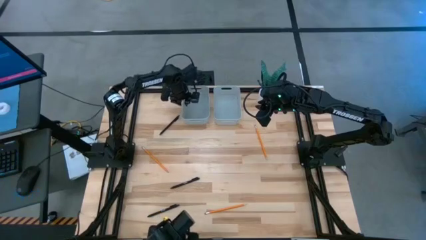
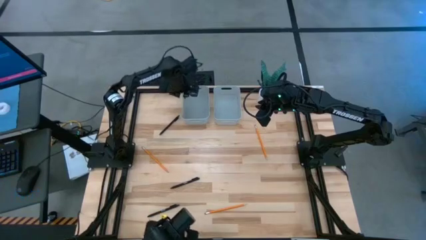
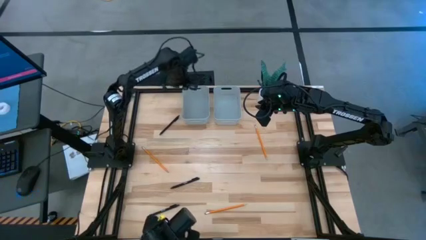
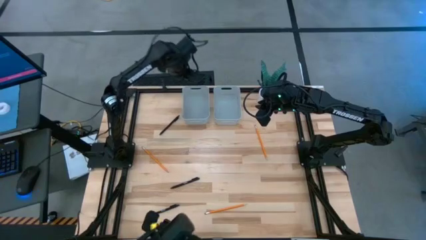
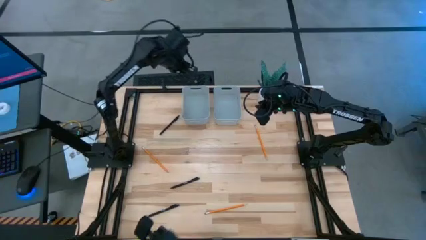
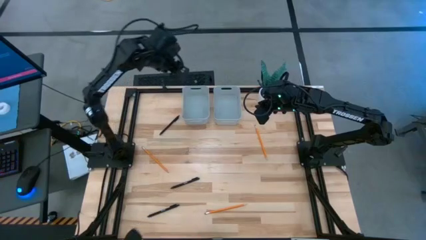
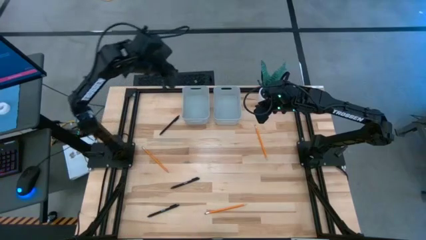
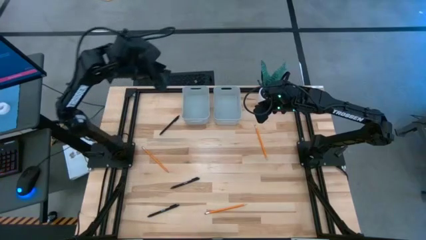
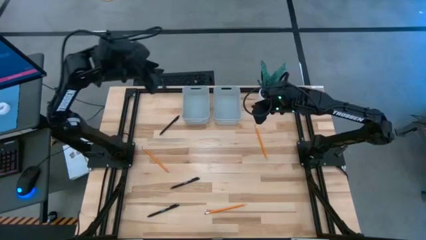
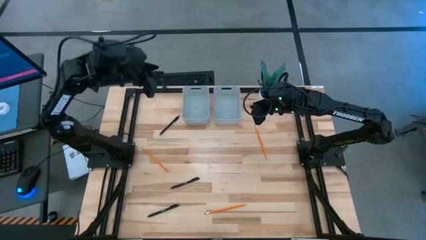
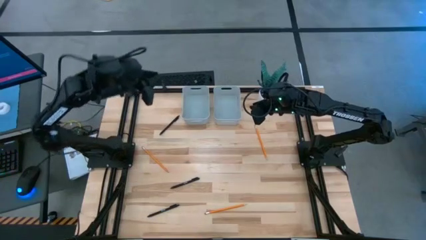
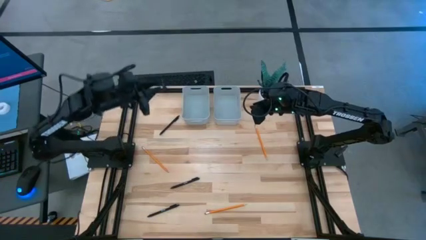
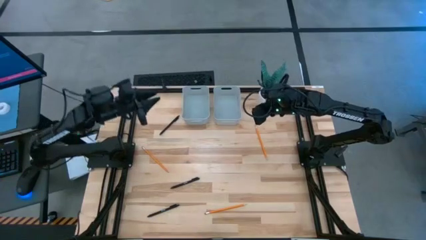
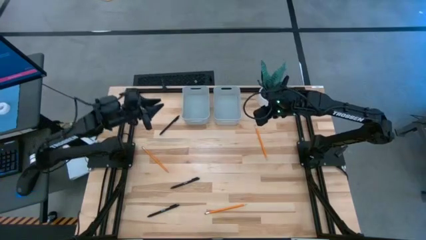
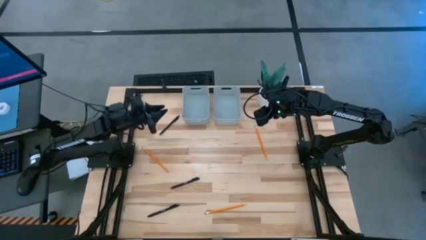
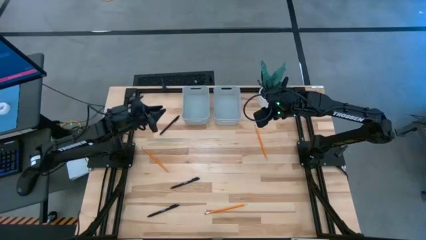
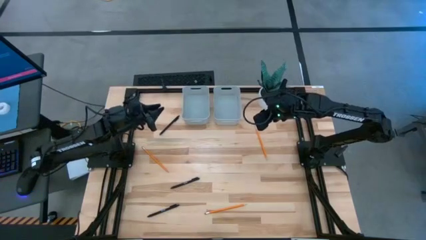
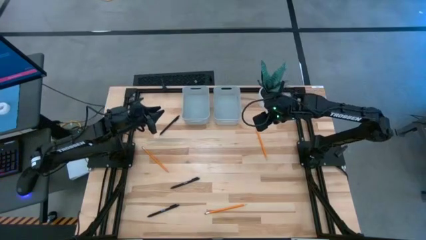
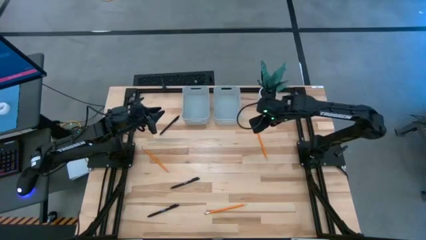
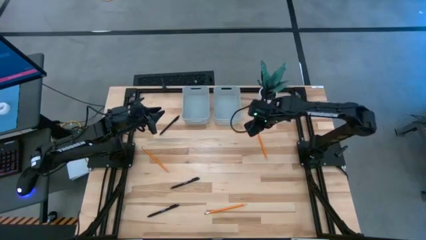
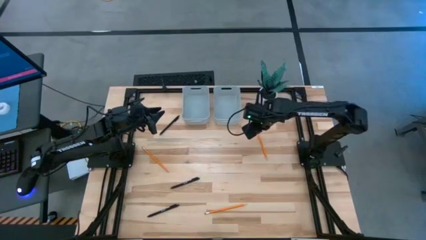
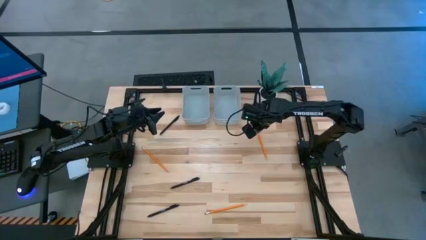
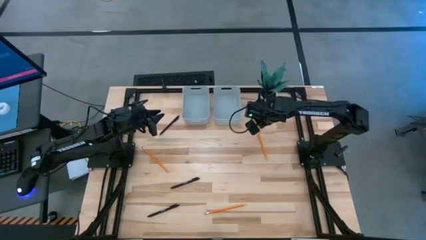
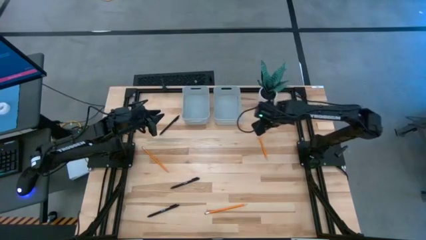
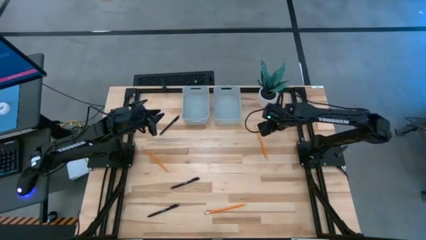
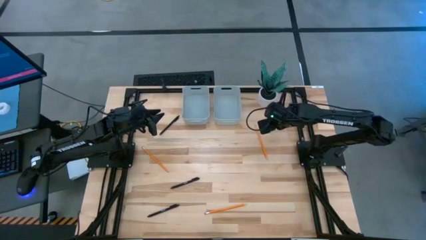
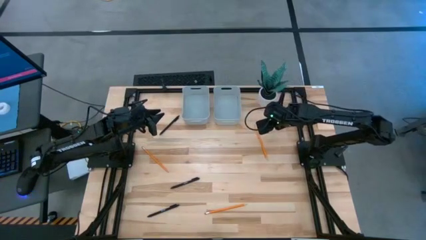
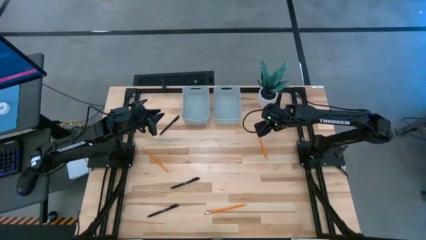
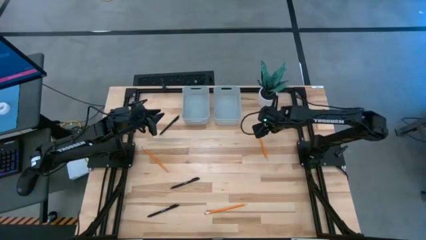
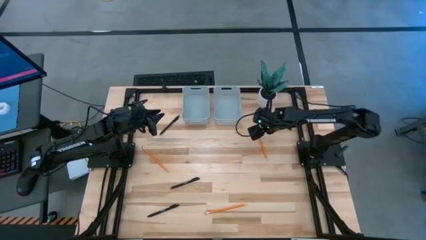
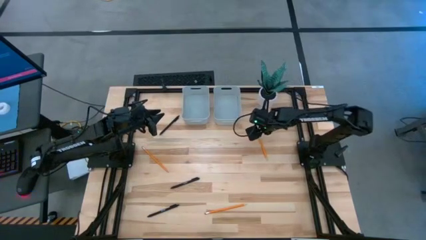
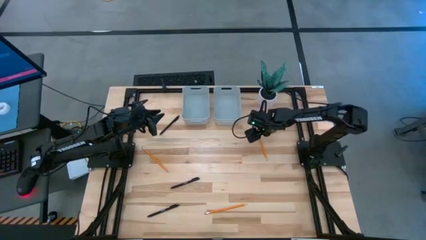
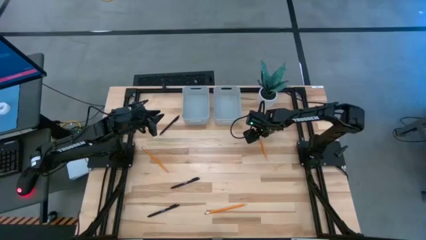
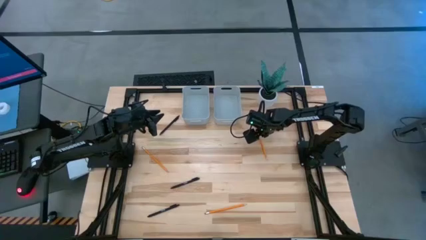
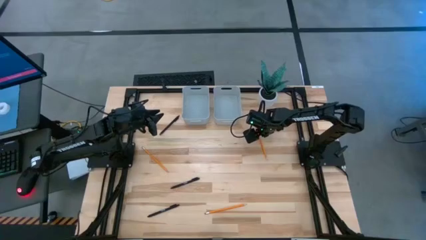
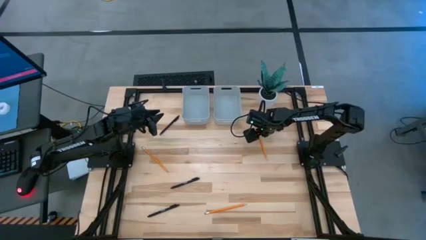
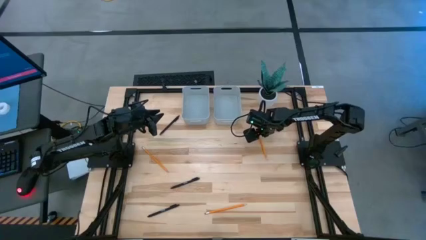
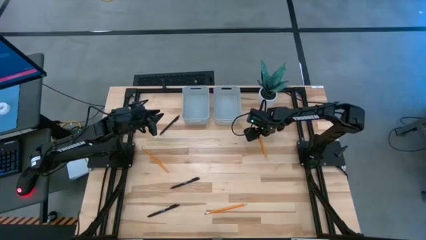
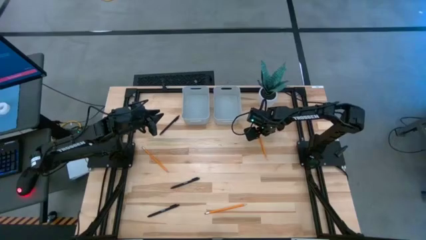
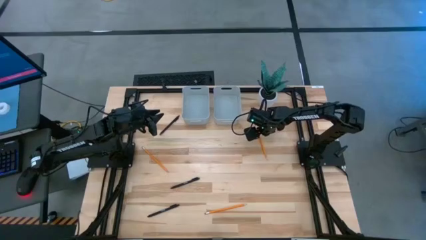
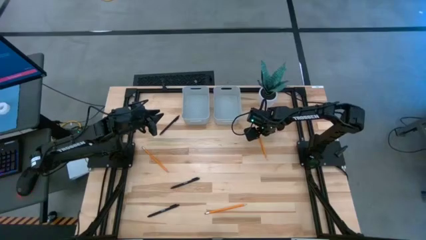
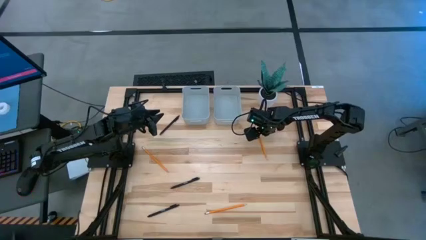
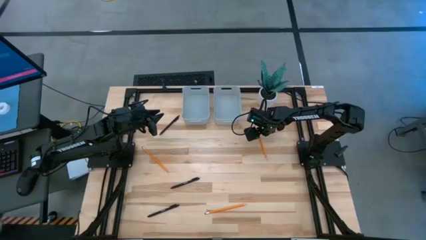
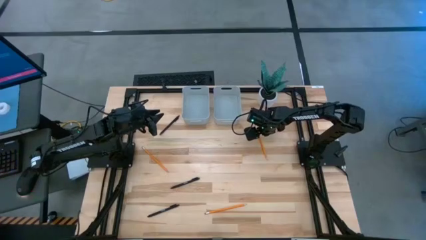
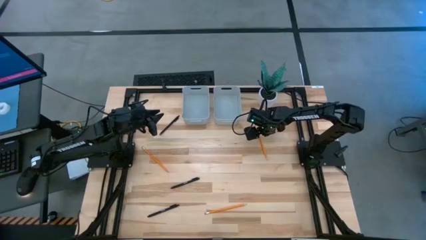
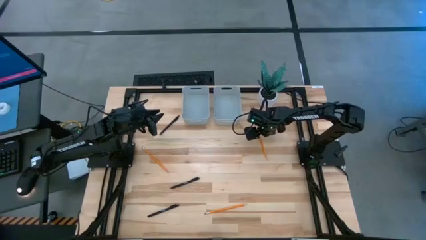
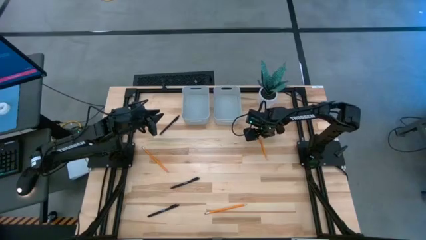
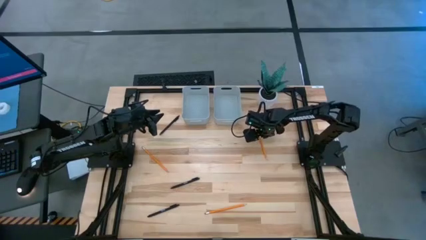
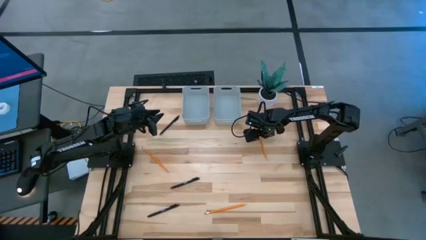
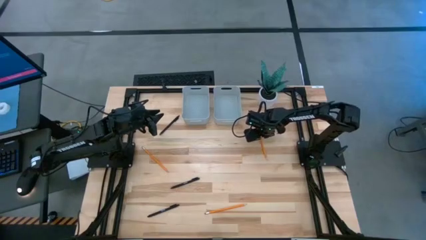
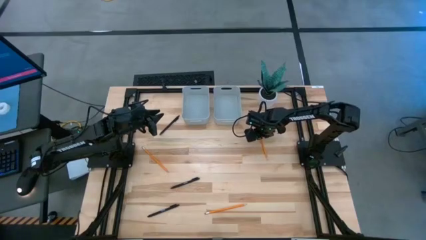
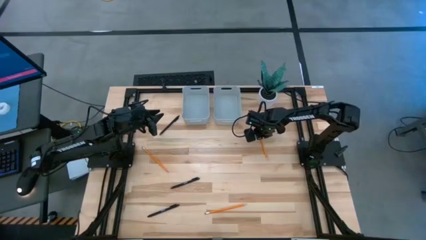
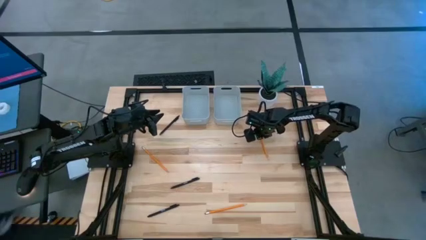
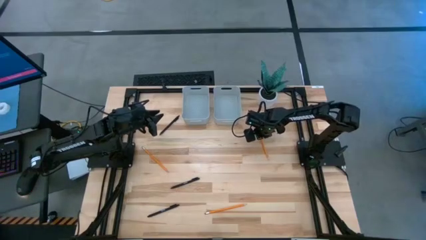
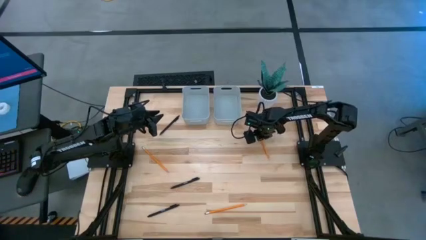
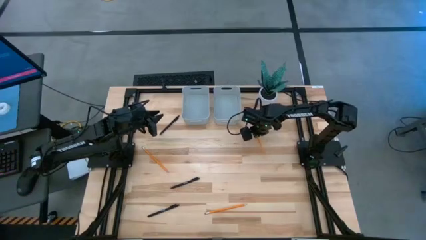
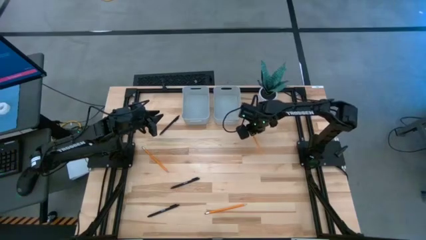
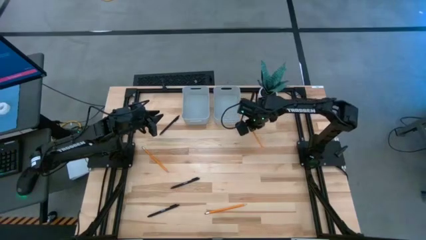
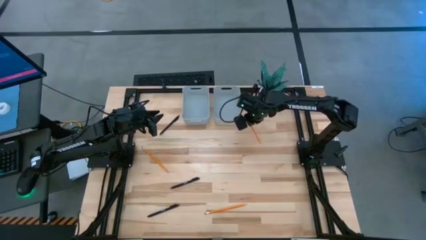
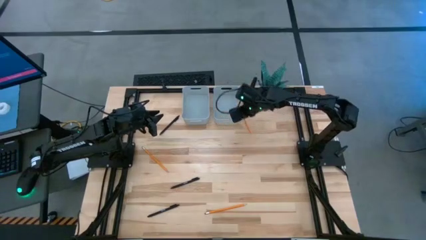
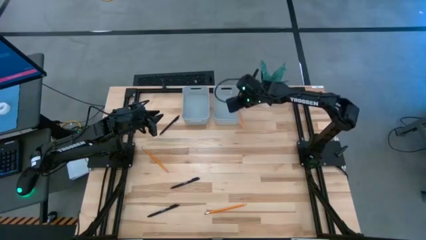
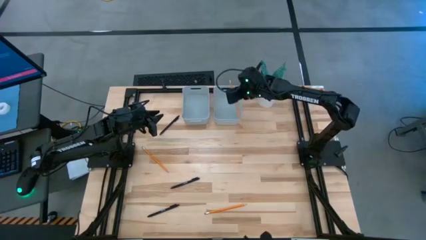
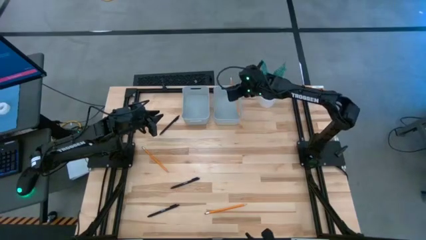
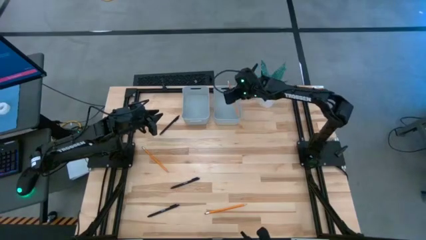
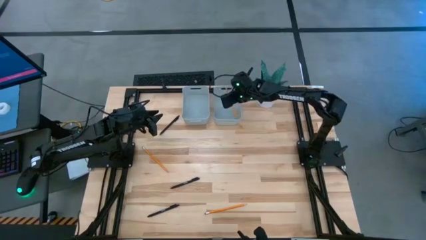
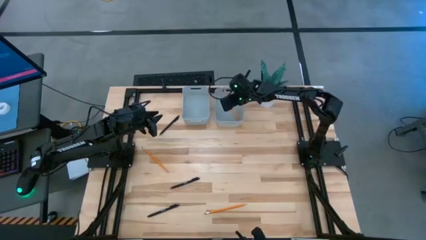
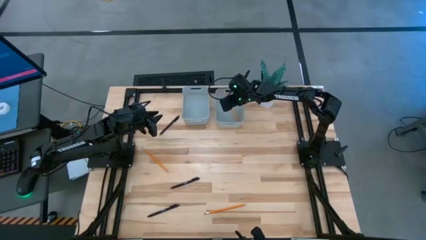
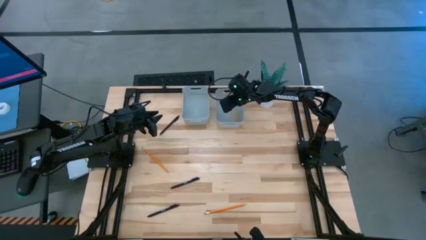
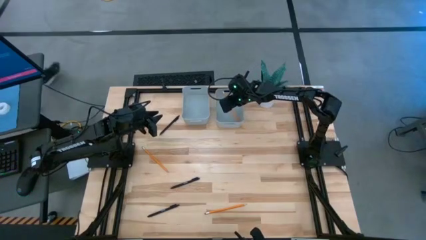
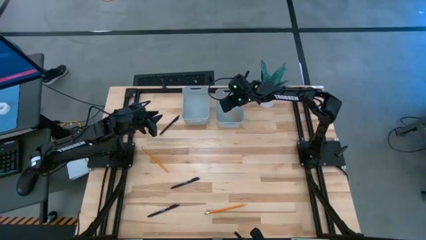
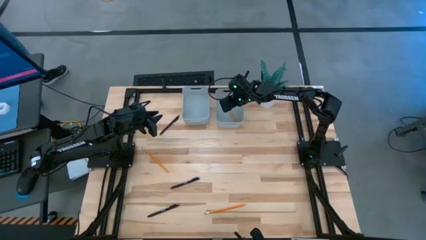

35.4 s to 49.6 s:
Task: Sort pens & pencils
Put the top right orange pencil into the right gray bin

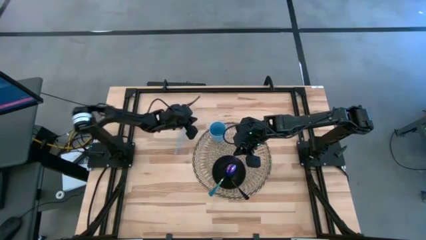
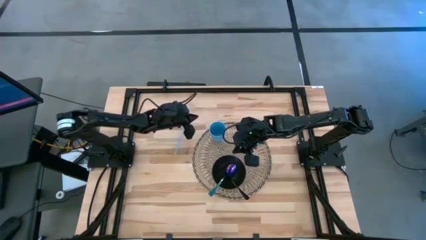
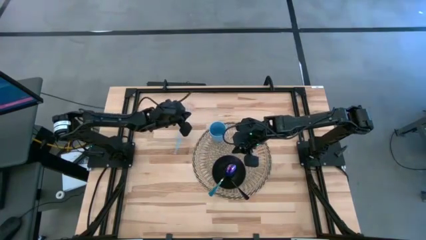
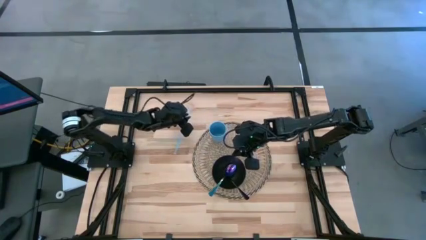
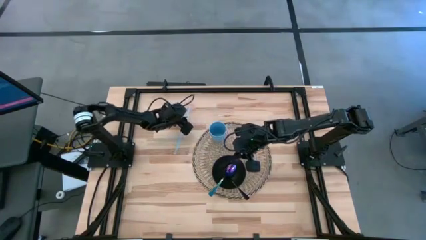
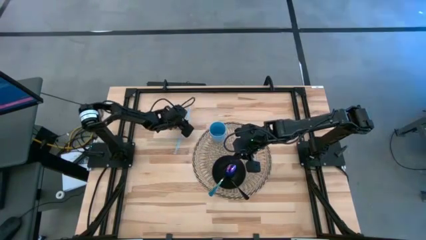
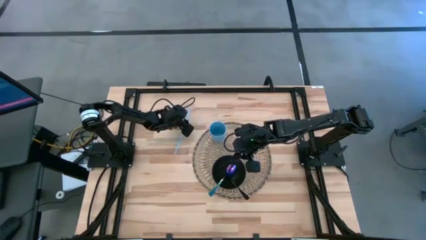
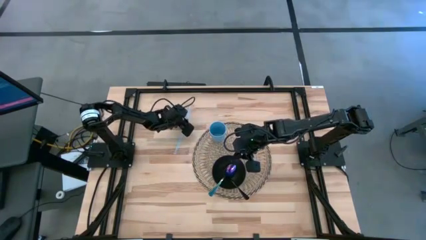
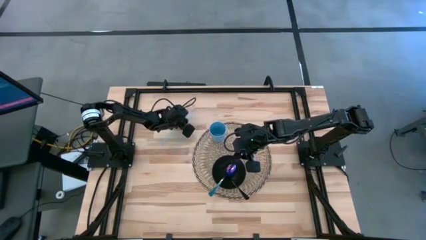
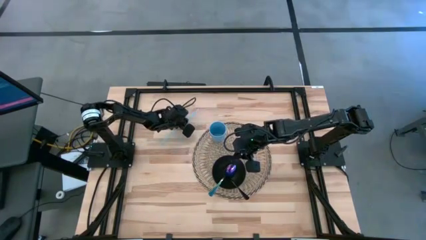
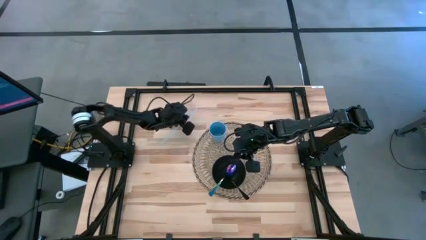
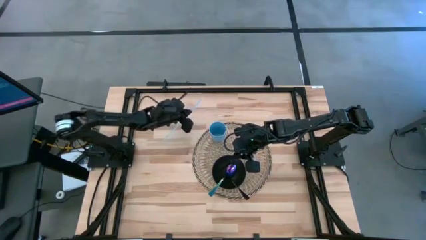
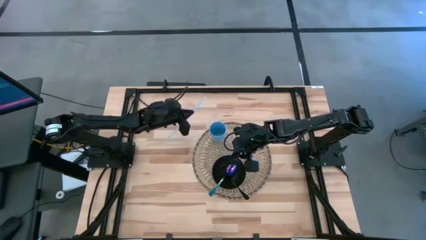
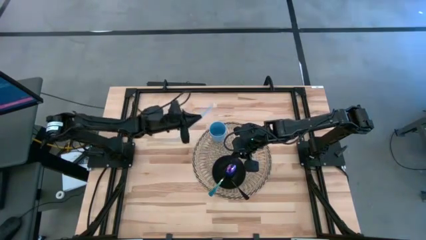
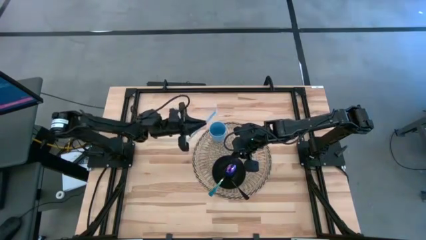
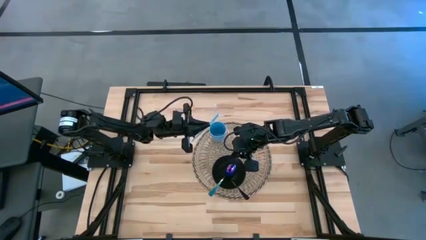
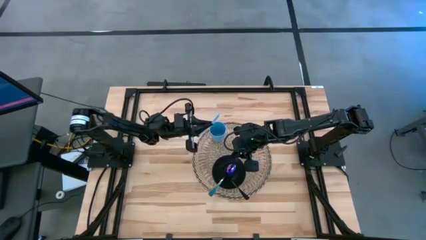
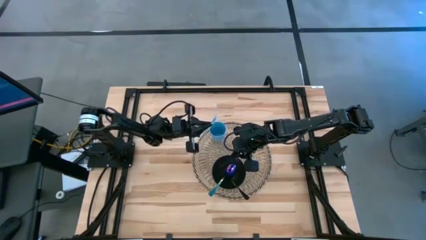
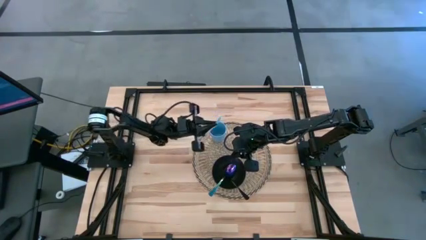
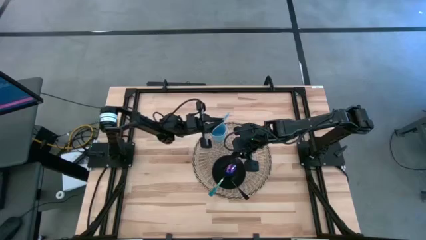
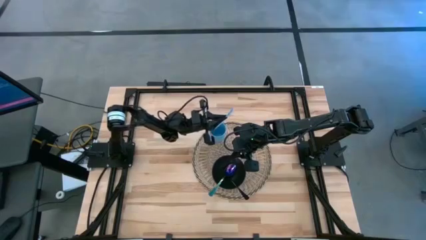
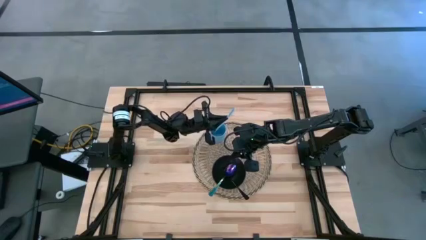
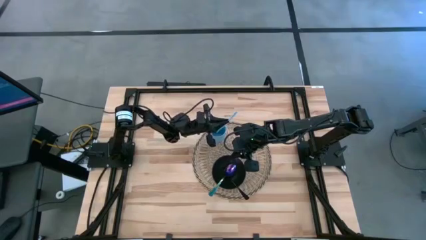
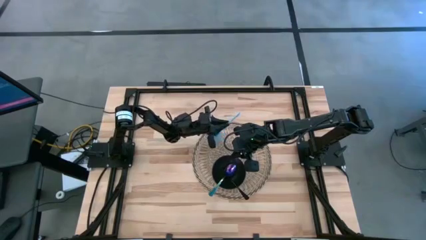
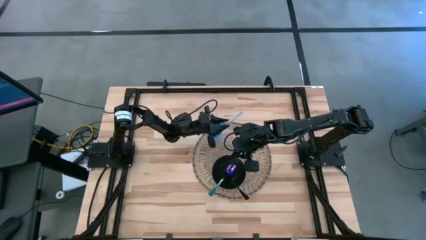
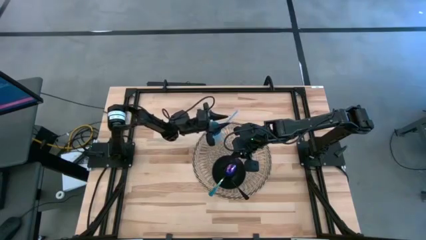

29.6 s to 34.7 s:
Task: Pick & Place Utensil
Put the blue straw into the blue cup
